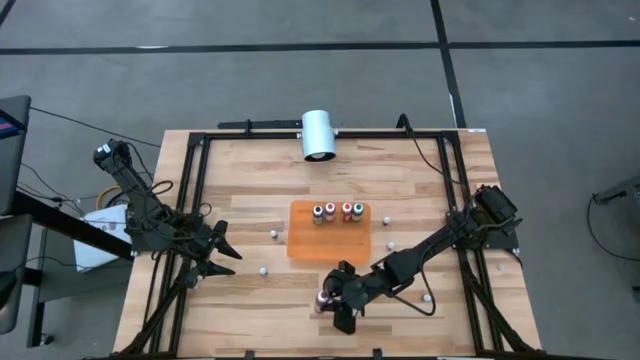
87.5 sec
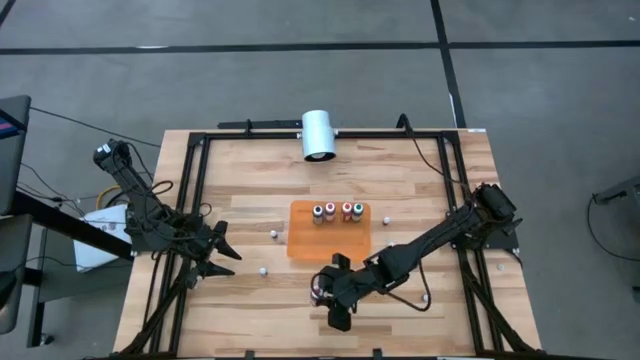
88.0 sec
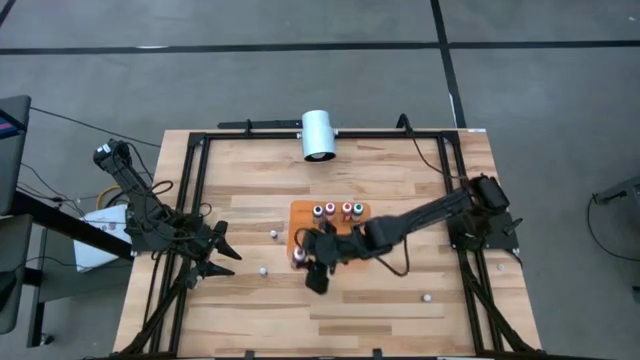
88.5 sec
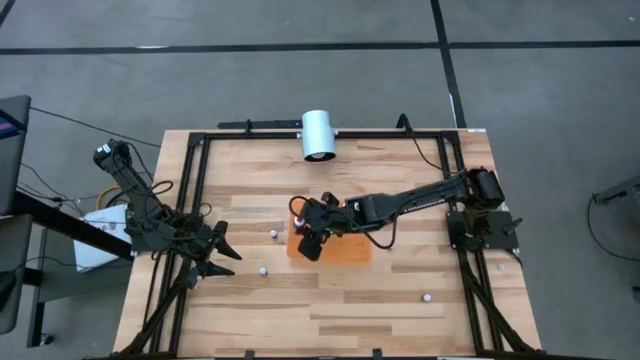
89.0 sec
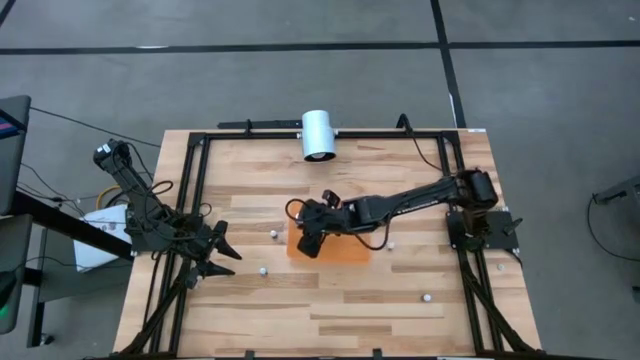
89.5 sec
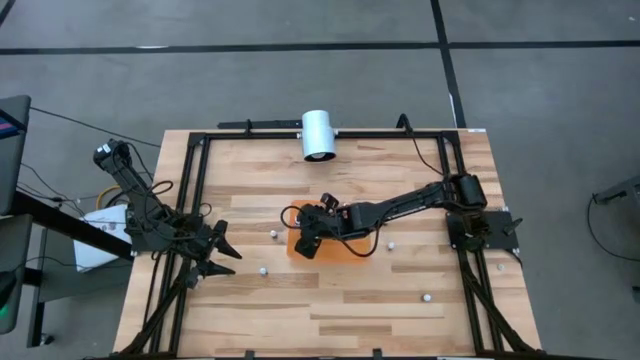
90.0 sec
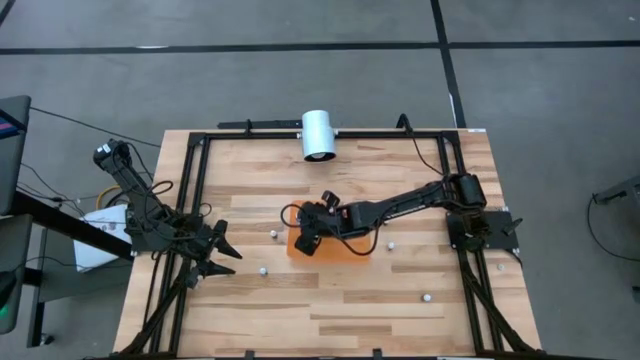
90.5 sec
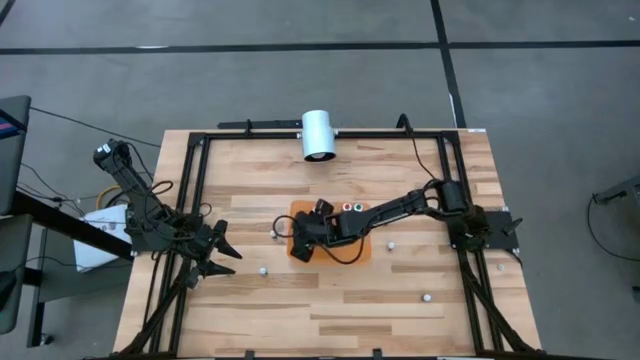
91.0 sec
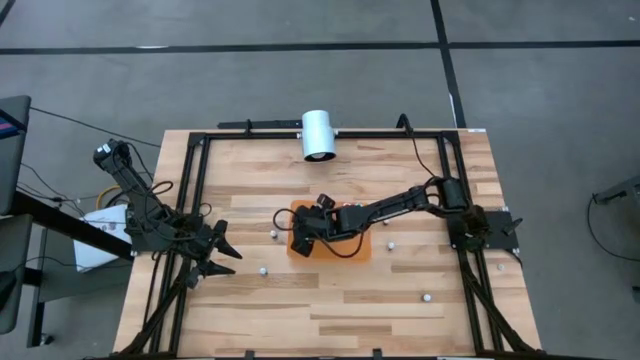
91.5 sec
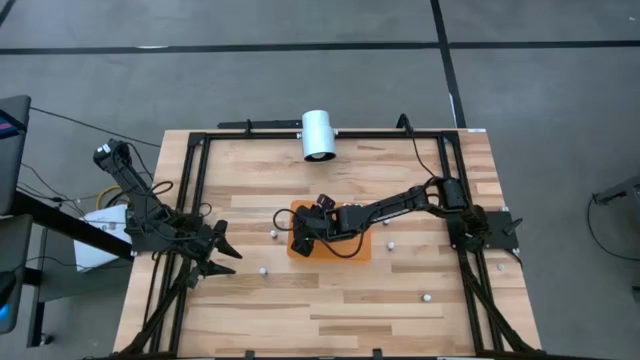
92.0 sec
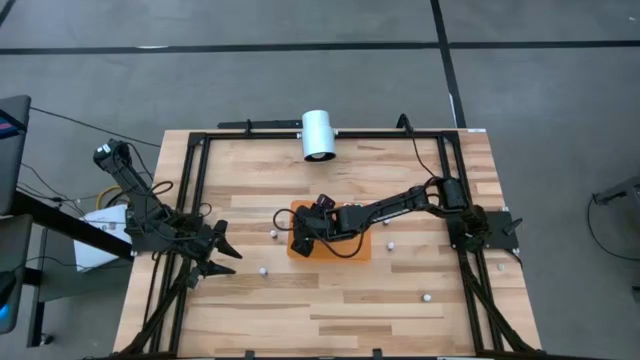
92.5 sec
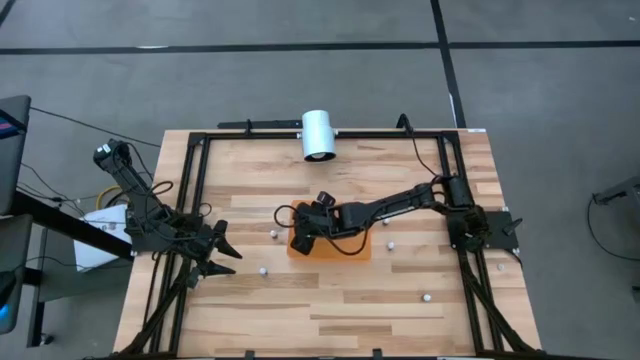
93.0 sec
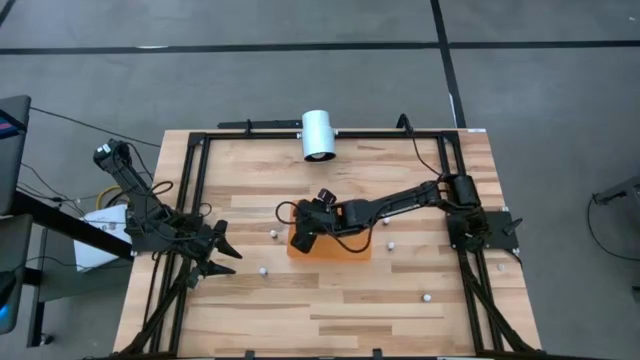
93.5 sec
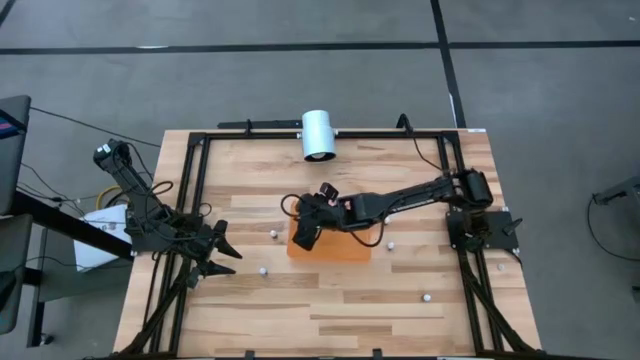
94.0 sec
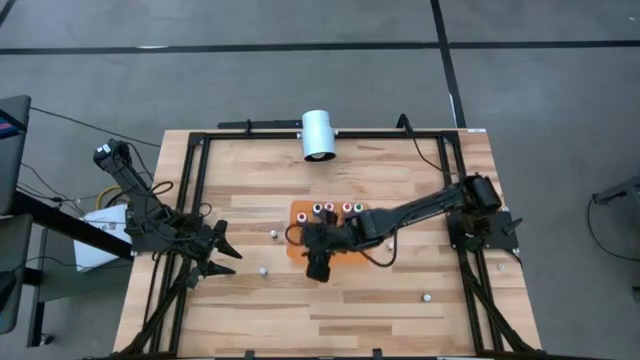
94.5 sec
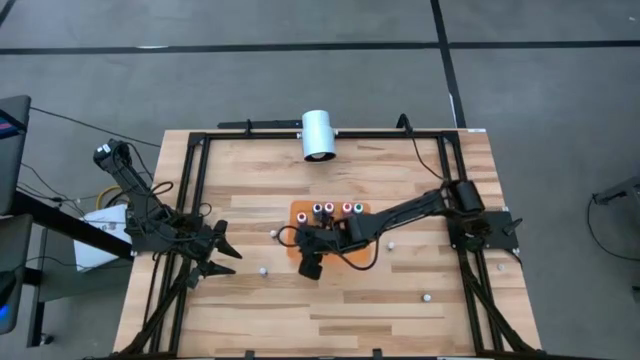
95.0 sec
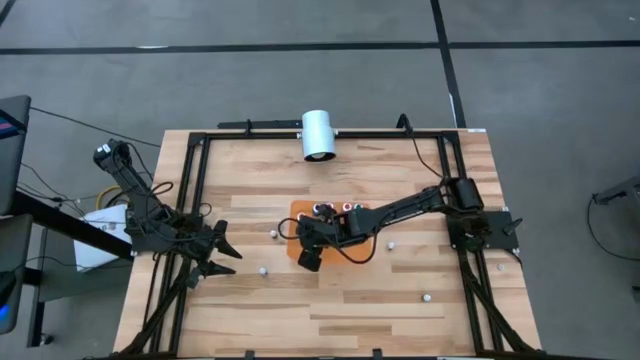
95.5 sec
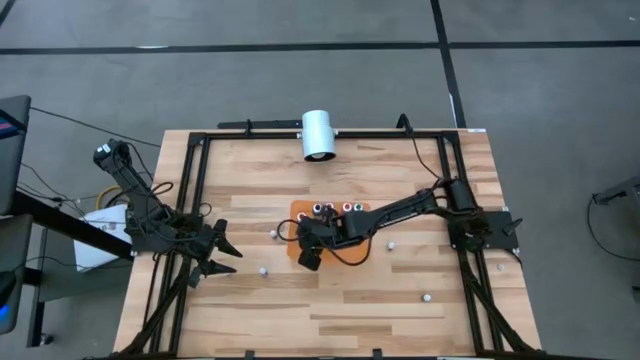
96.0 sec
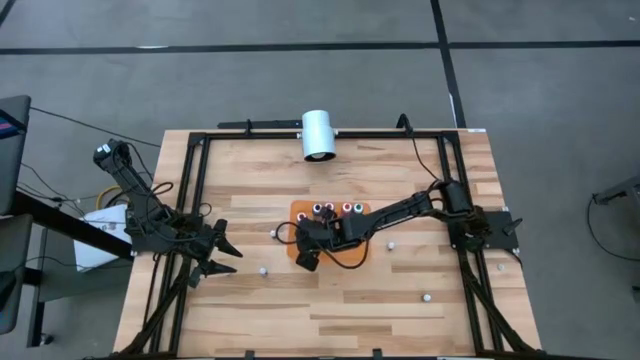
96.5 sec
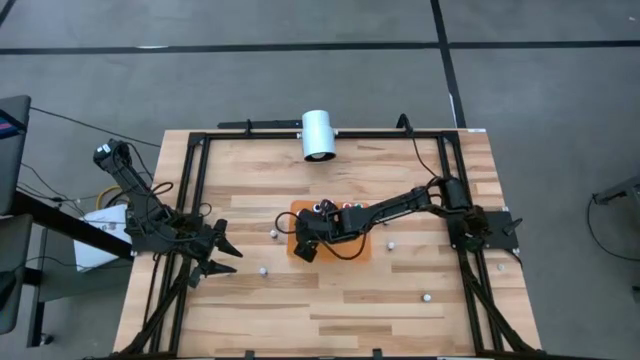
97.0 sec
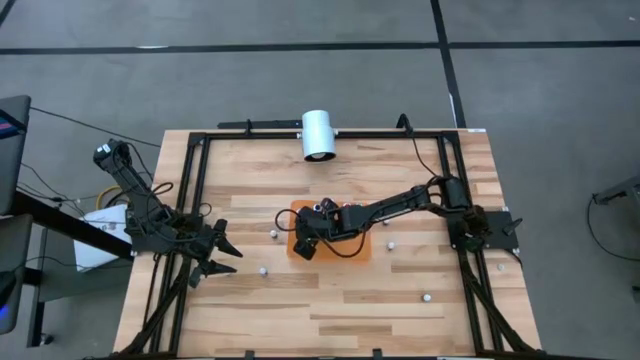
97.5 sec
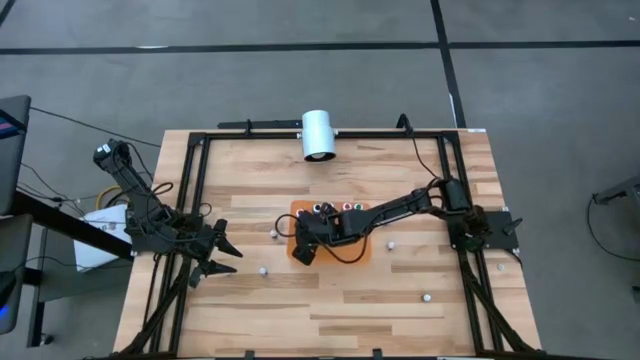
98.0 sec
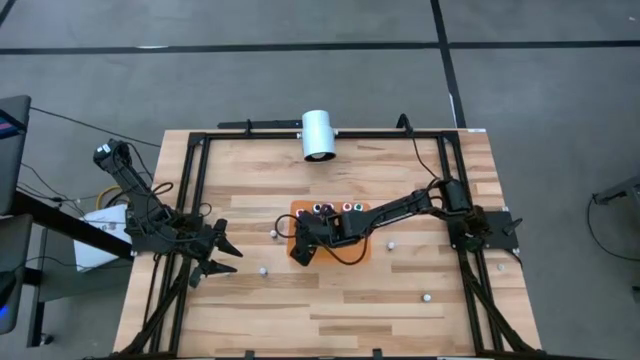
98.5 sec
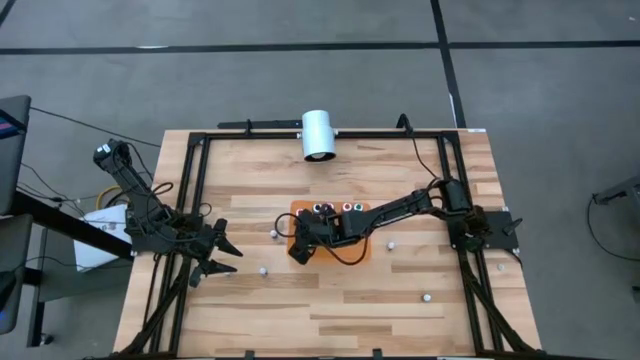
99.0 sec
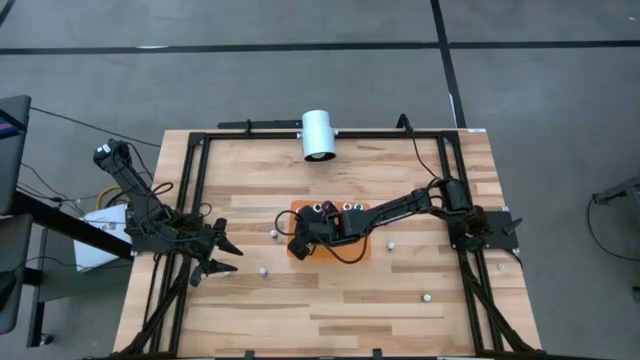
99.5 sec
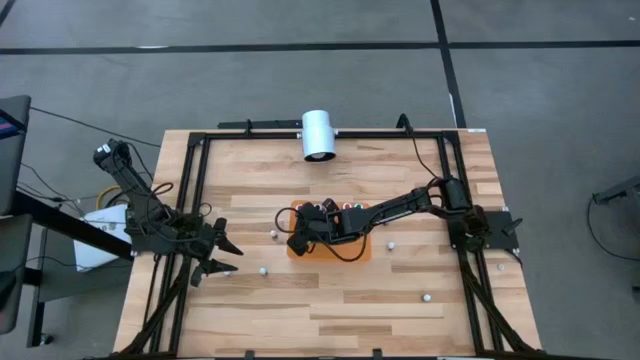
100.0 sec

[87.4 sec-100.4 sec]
Task: Pick & Place food coloring
Put the large red food coloring into the orange bin

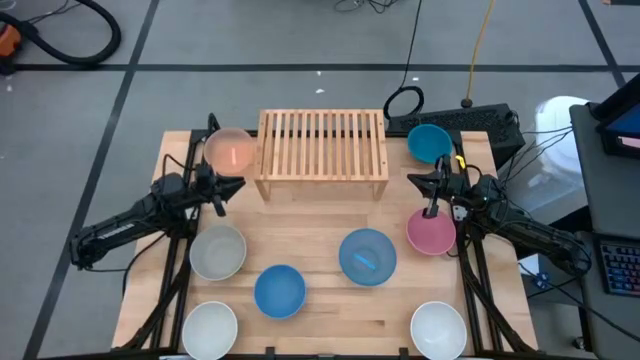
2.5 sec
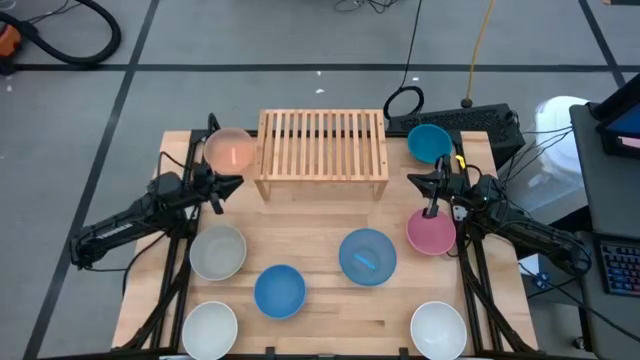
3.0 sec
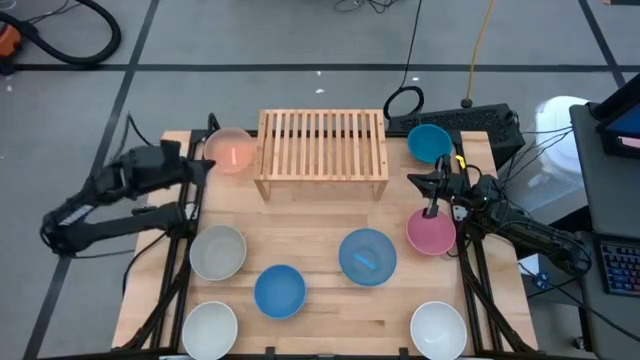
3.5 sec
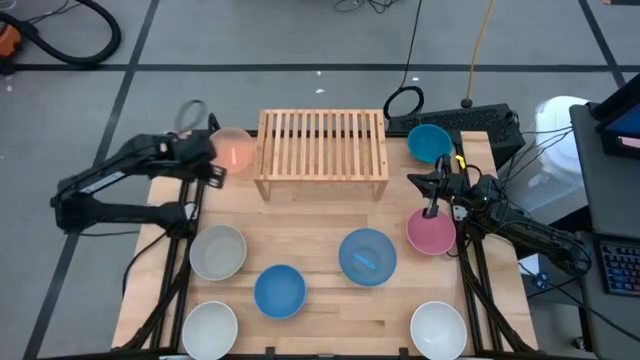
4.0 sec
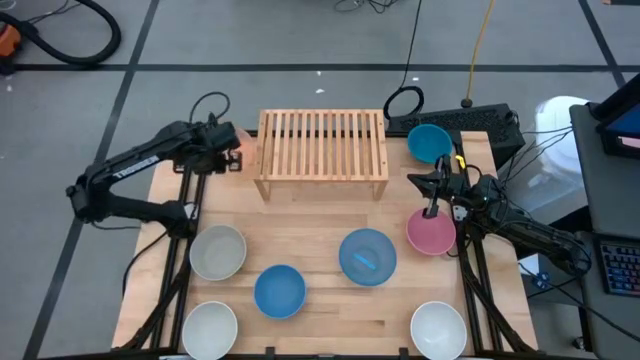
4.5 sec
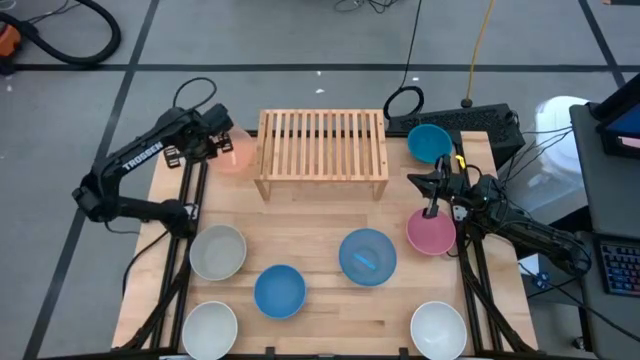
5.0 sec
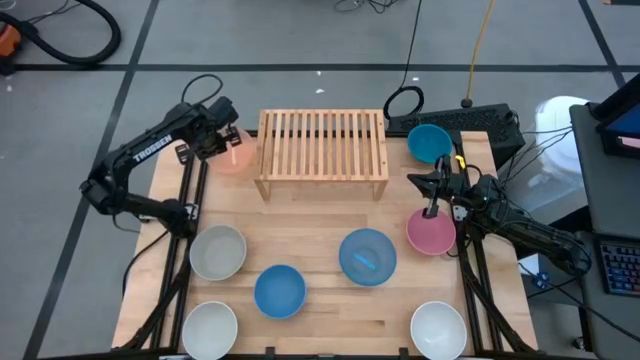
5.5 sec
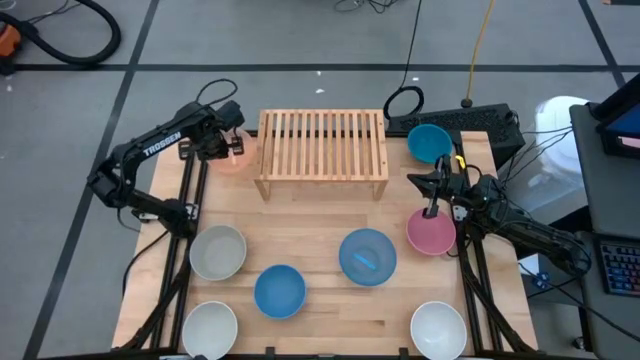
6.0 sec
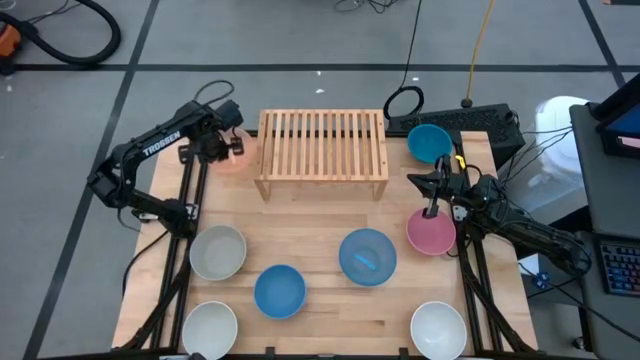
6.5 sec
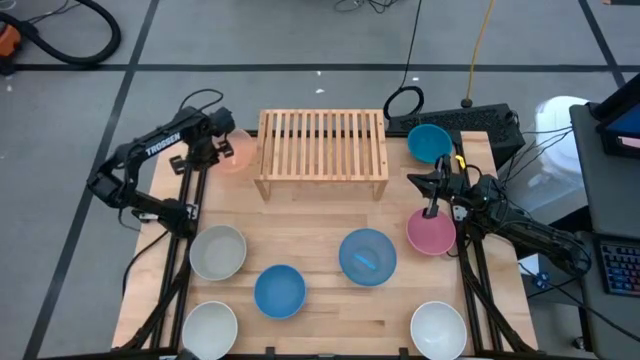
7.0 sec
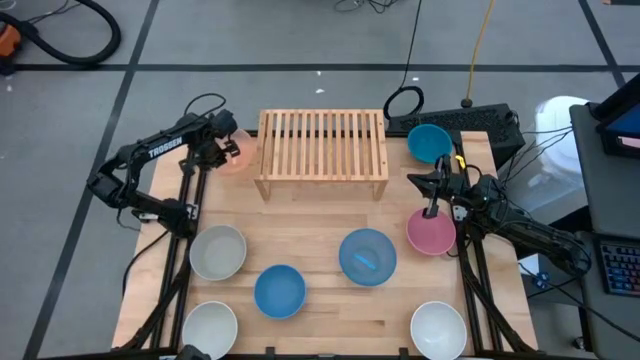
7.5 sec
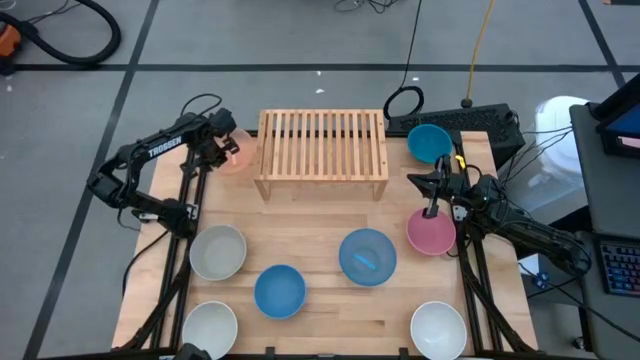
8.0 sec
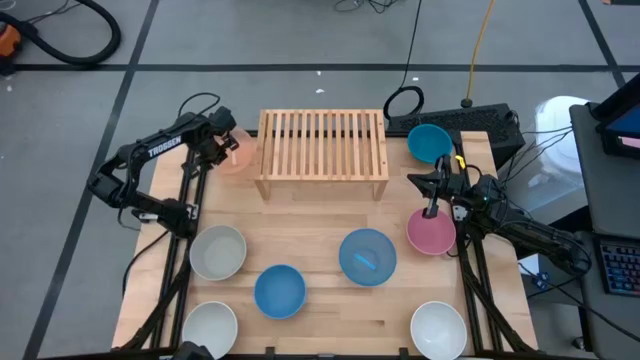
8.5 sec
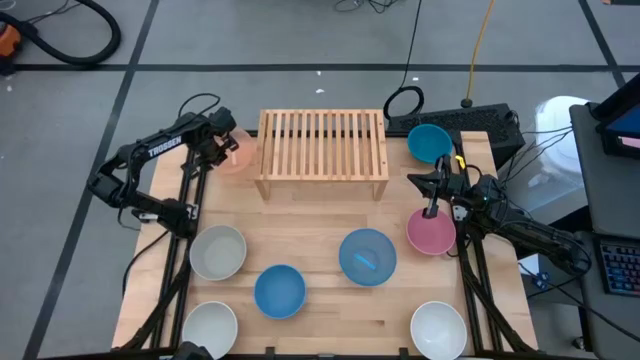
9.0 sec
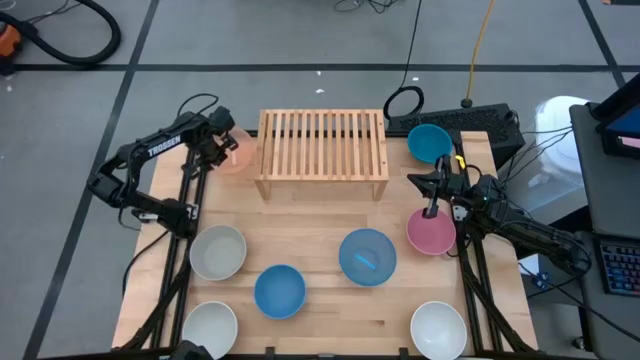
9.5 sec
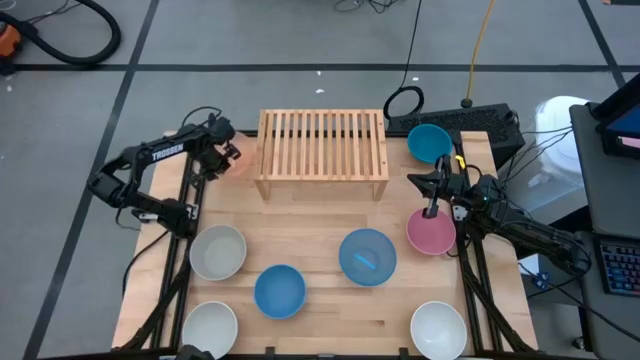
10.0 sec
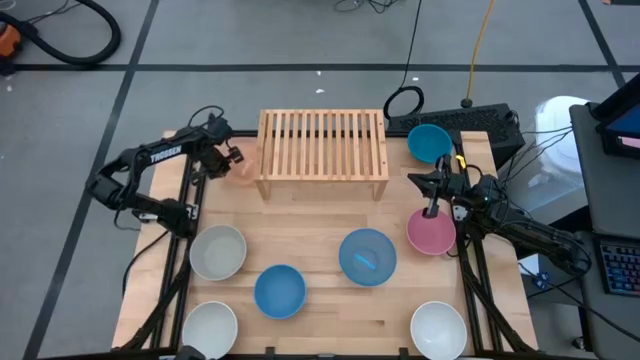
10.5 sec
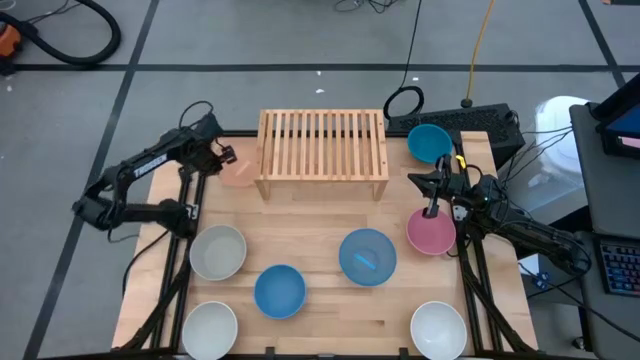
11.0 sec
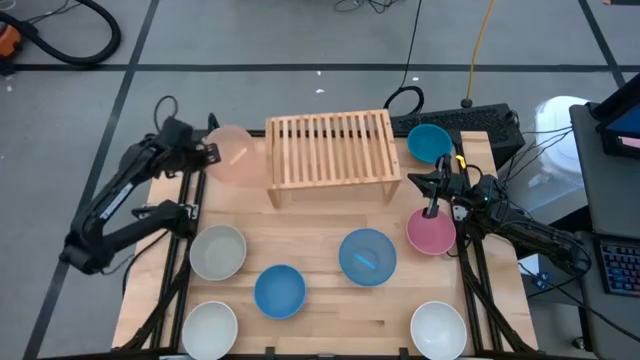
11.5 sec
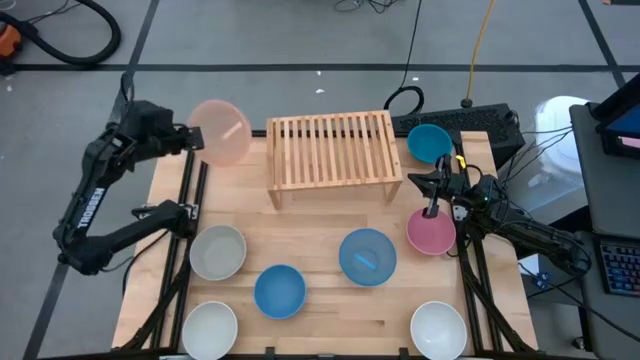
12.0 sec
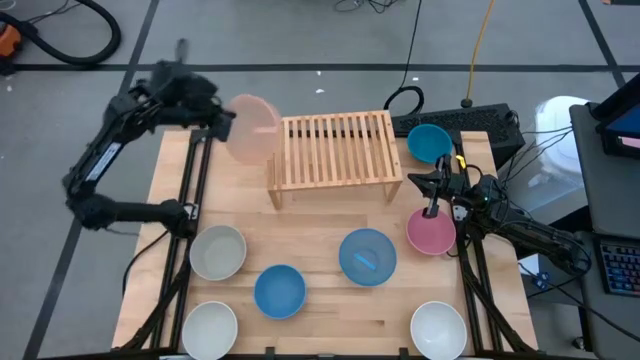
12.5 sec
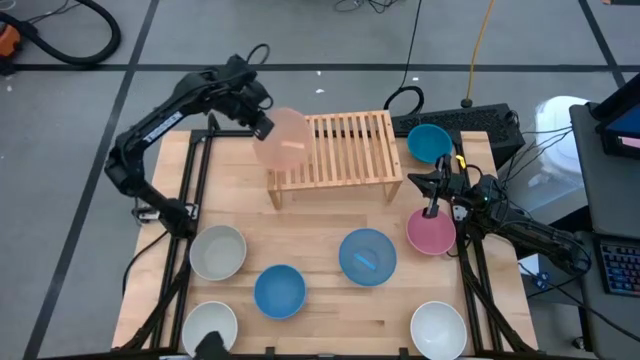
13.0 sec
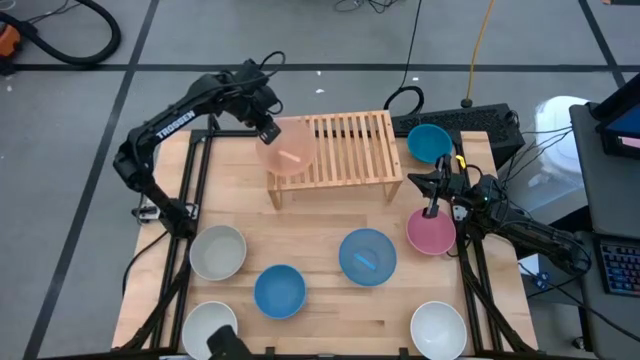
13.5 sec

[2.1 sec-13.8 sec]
Task: Place and stack bowls onto a shelf
Put the orange bowl on the shelf
